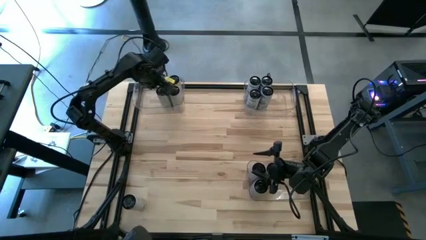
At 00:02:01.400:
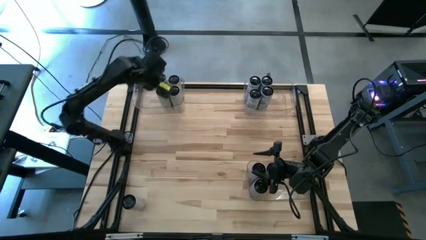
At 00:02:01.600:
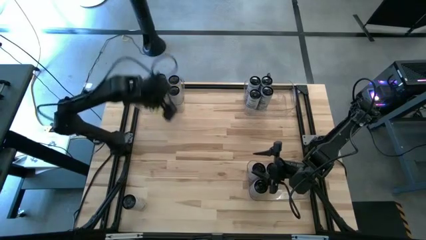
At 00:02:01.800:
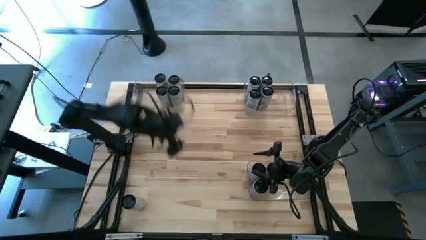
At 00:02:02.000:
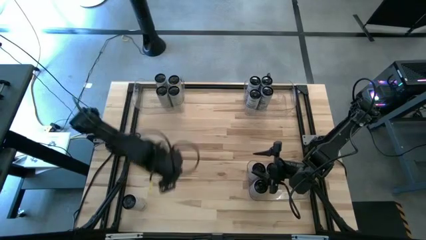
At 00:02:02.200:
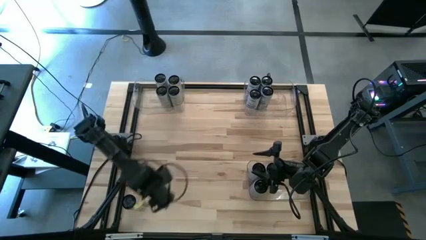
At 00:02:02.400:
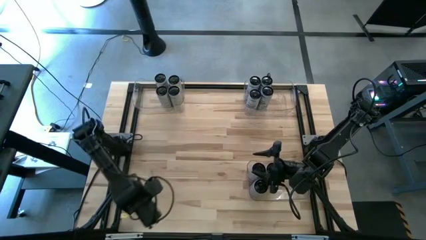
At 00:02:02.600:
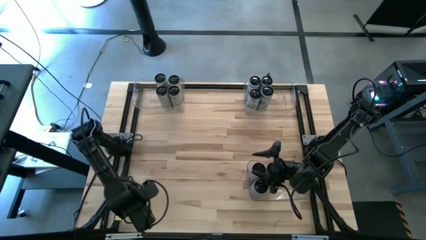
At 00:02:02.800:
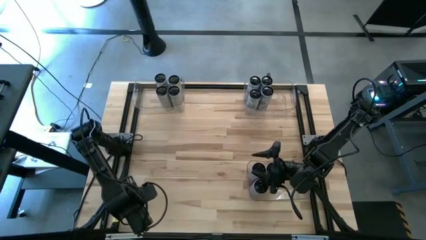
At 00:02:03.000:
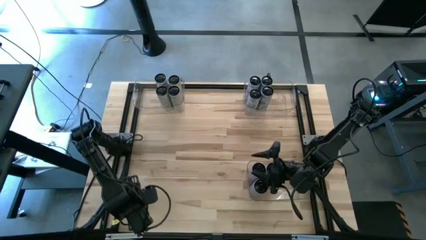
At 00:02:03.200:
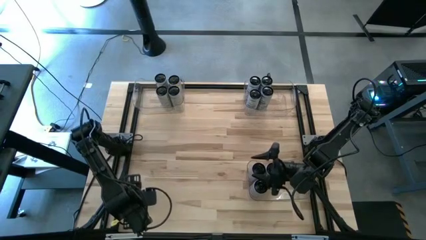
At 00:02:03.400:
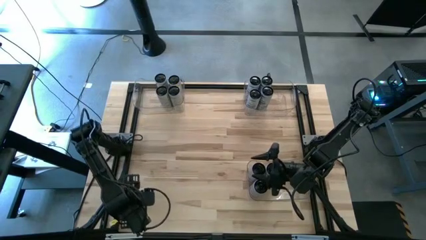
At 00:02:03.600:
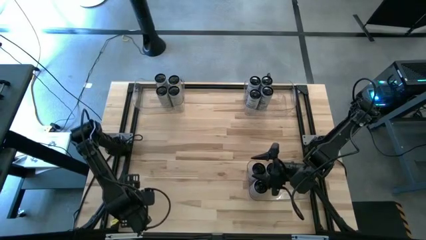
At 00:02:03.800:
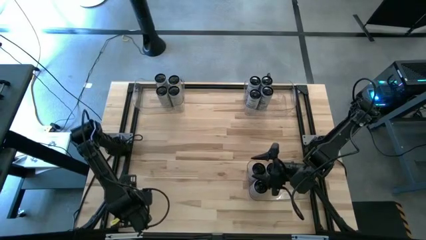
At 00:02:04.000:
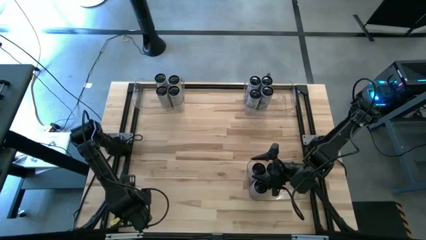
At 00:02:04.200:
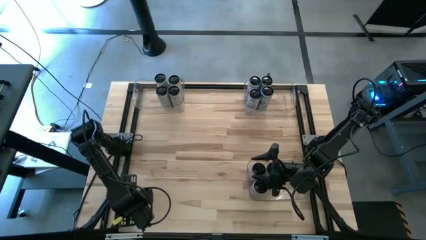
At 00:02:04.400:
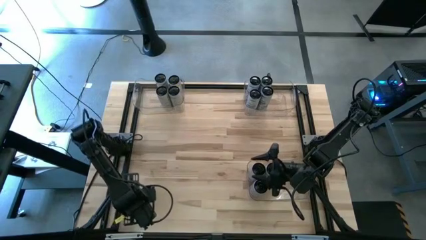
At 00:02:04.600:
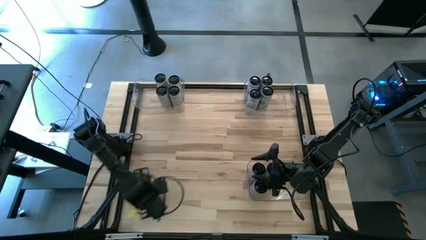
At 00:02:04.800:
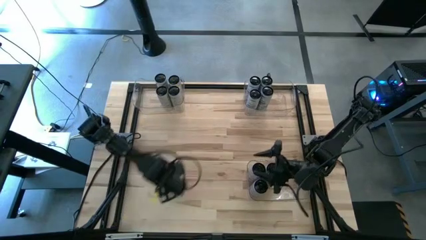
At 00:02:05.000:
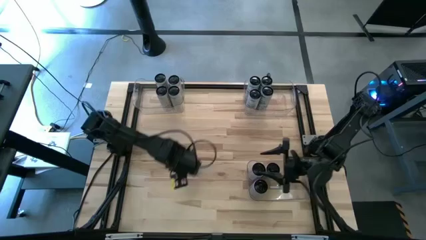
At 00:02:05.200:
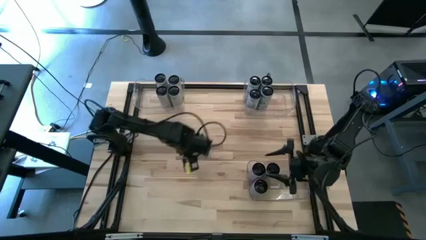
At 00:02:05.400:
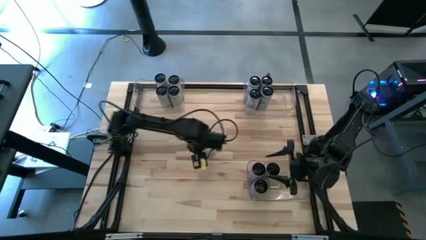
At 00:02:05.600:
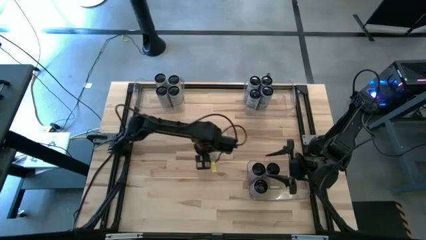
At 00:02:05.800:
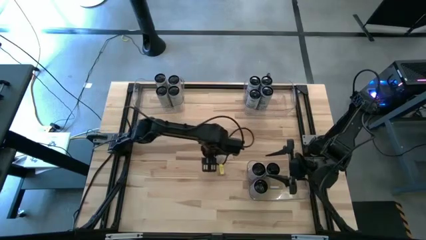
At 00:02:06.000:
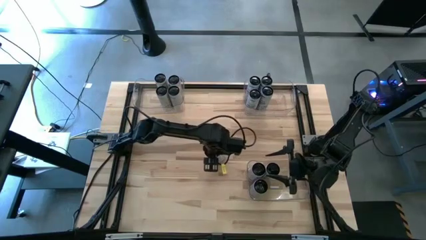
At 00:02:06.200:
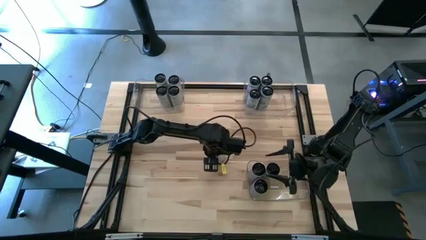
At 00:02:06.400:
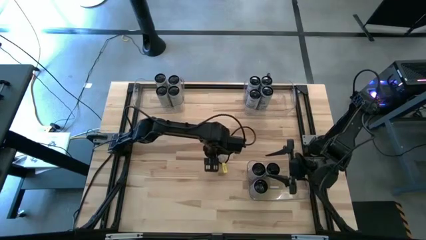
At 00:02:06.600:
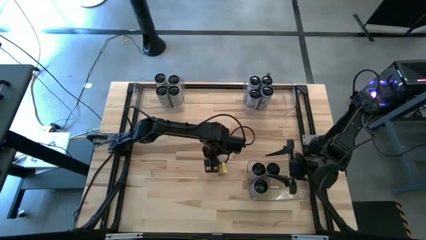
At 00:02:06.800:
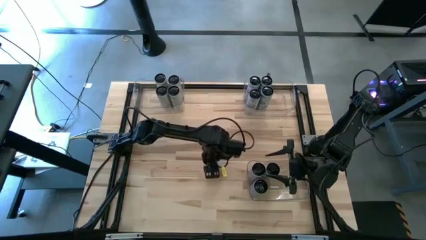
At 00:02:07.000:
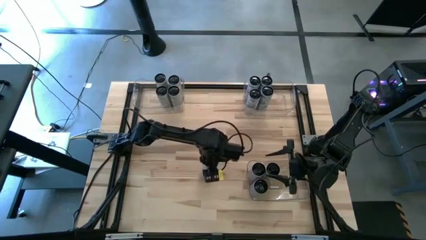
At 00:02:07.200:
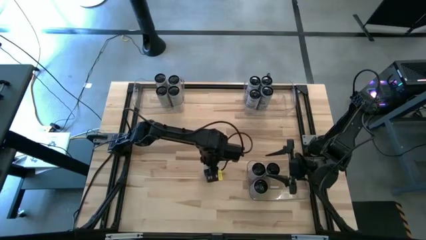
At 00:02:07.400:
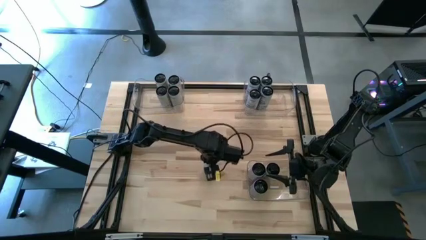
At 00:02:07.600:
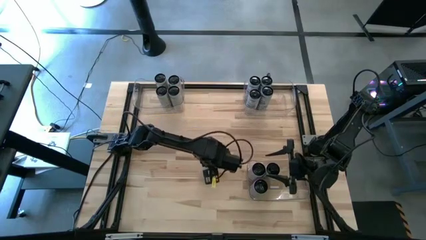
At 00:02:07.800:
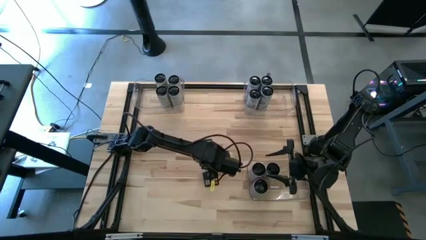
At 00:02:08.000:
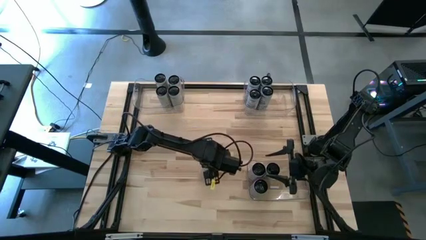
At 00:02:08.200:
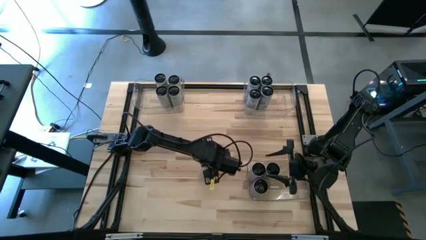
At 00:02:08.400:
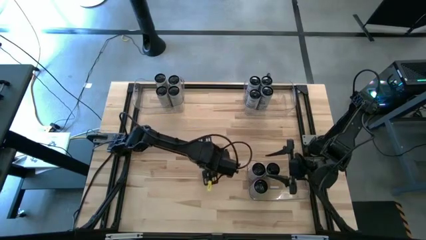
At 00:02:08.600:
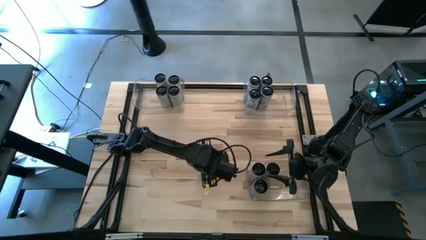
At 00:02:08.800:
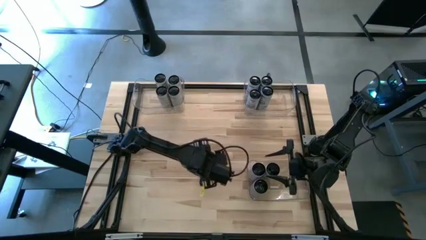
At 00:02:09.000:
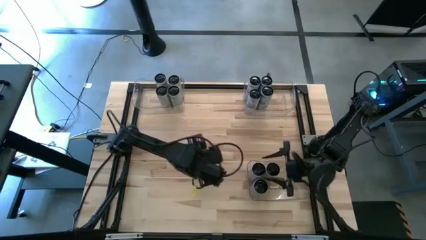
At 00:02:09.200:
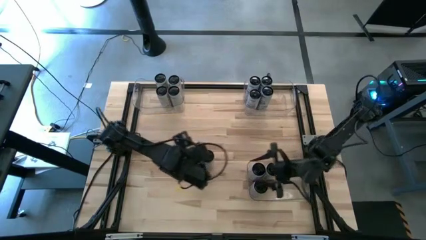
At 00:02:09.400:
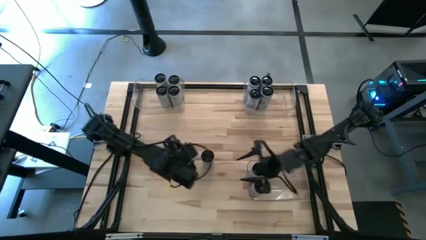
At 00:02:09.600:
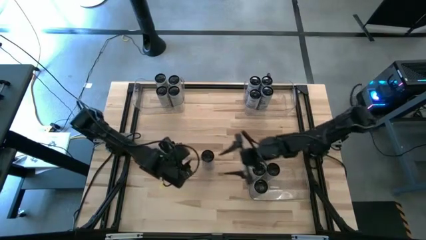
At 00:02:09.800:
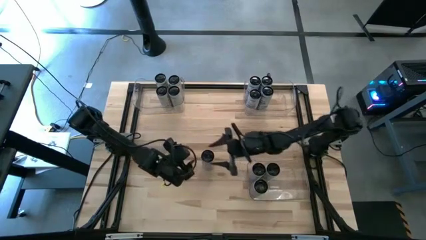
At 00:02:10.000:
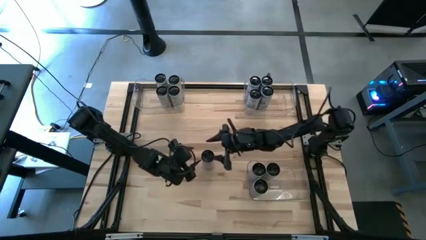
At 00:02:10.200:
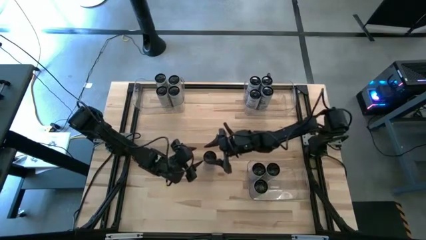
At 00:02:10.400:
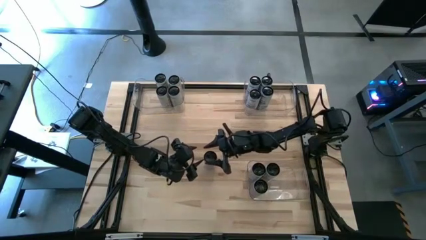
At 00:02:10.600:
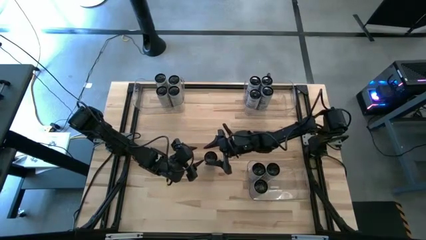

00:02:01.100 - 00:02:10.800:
Task: Sort soda cans
Put the white-pink soda can into the bottom right transparent bin

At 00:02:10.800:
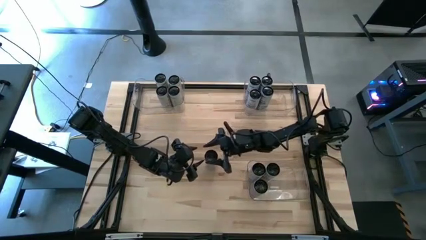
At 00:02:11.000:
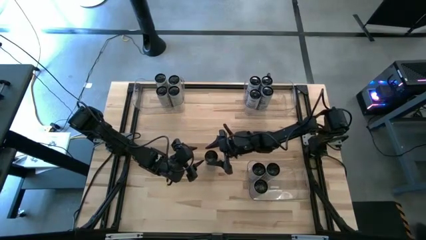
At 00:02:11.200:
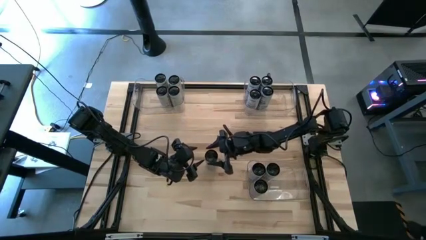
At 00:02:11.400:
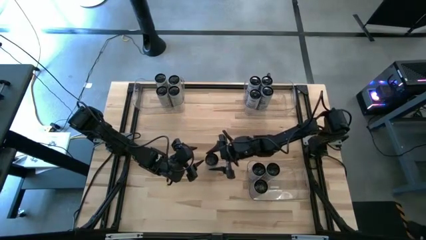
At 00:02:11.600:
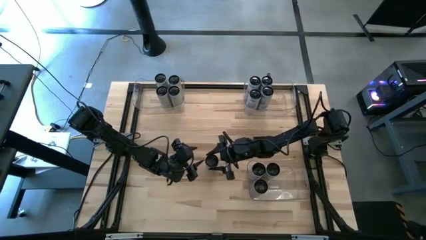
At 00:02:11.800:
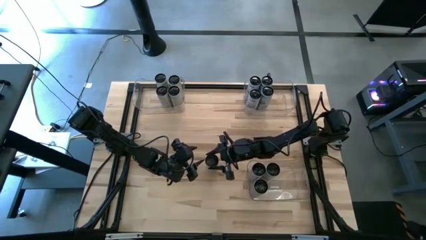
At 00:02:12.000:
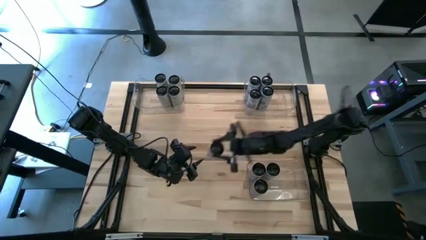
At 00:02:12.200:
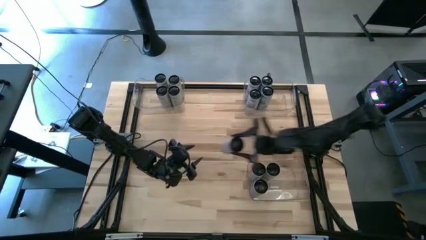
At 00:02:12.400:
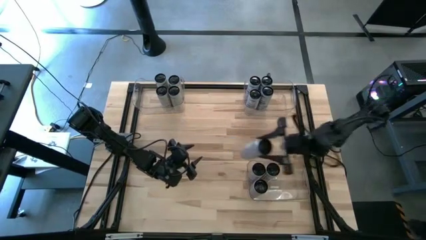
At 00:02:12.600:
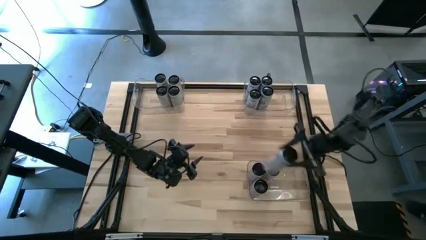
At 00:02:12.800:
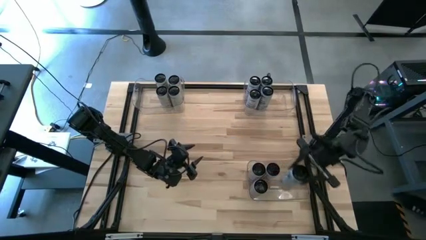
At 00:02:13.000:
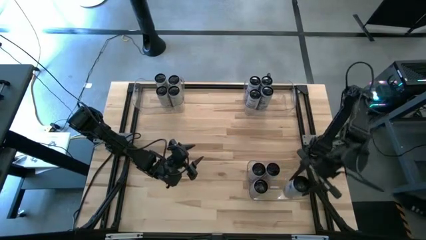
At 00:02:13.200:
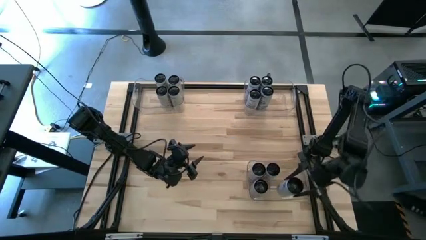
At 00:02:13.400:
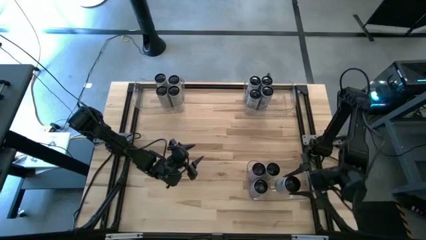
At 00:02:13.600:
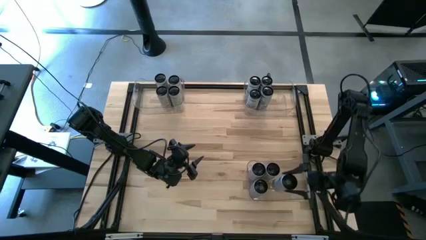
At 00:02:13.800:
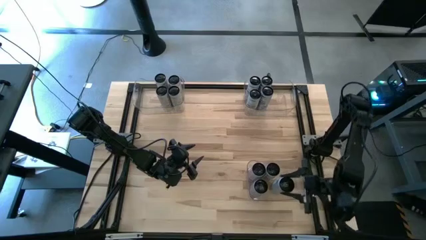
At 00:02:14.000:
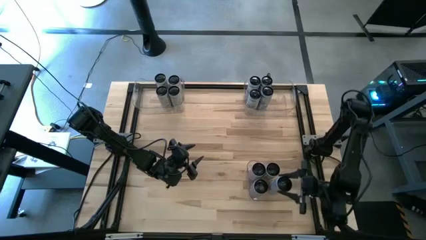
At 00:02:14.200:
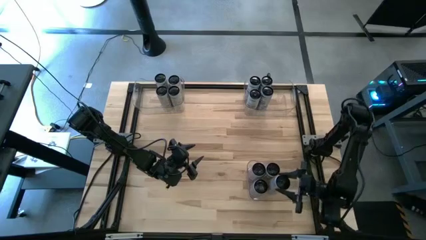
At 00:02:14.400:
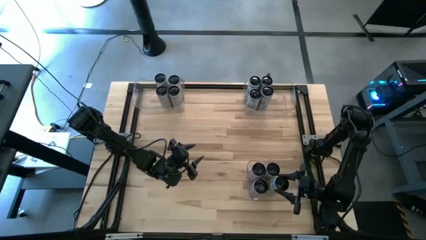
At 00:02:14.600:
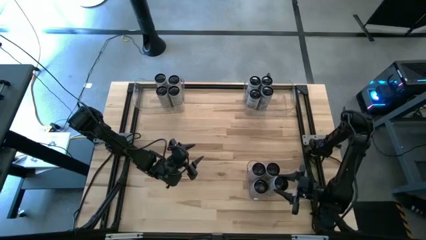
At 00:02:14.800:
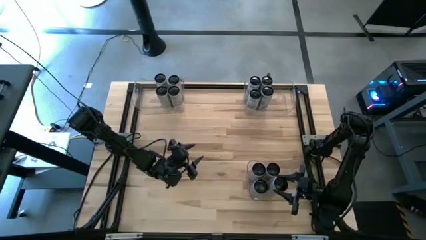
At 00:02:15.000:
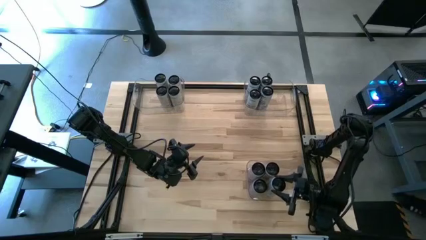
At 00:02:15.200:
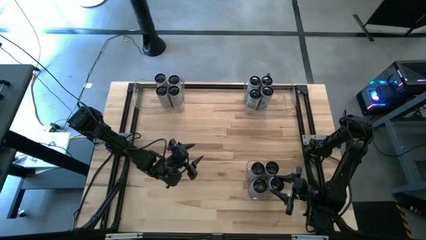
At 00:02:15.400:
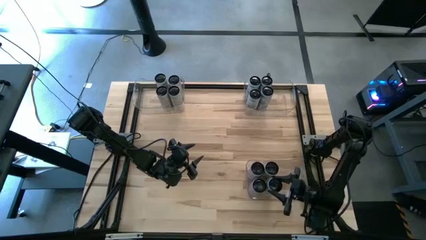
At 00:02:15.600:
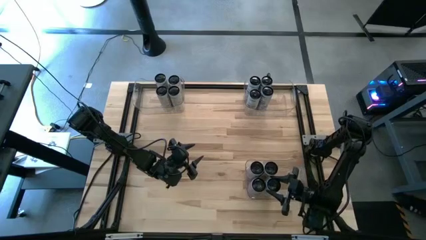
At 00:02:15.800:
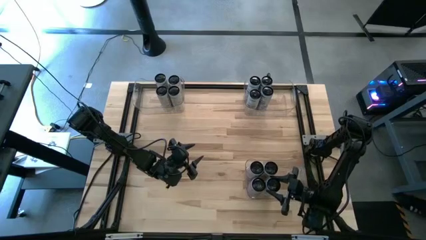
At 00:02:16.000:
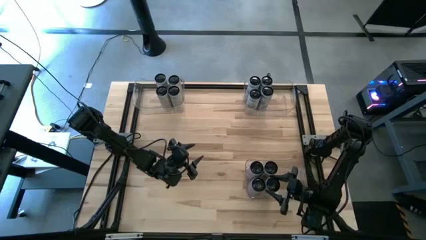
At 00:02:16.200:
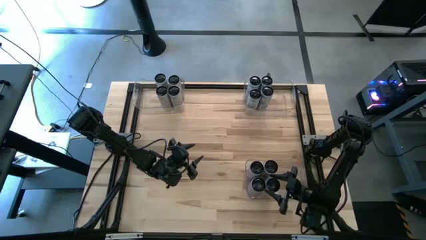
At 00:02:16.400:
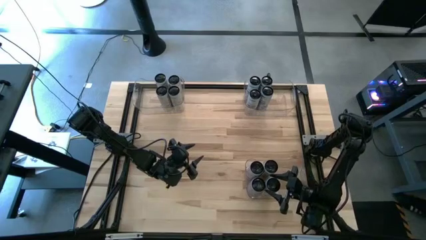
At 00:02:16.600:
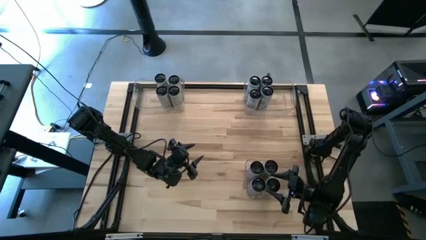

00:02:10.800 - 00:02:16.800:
Put the white-pink soda can into the bottom right transparent bin
